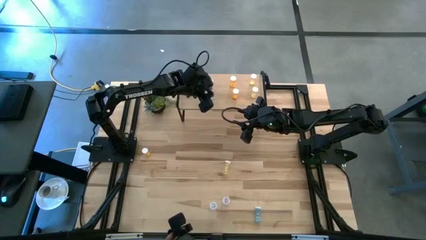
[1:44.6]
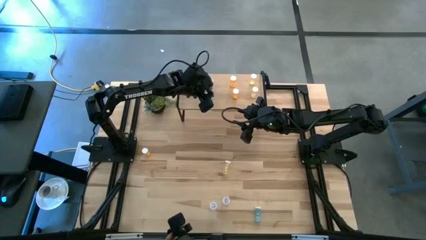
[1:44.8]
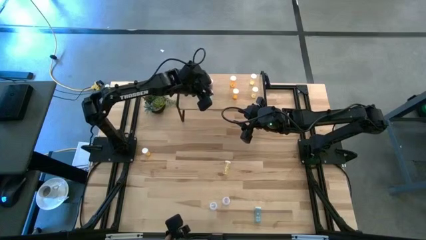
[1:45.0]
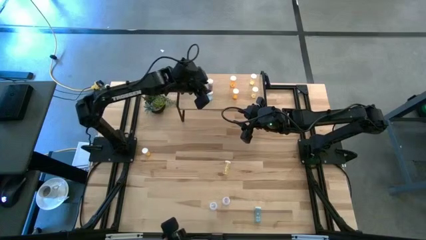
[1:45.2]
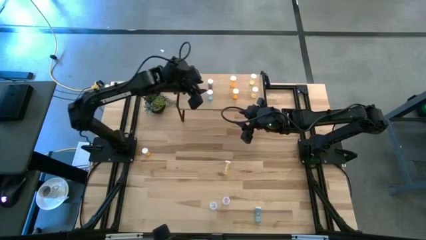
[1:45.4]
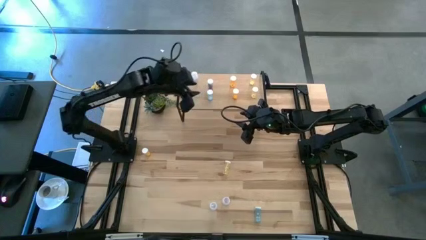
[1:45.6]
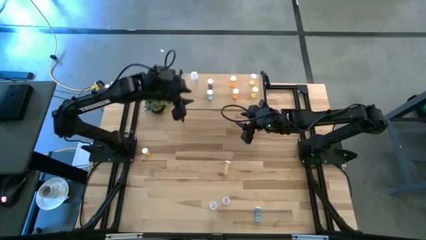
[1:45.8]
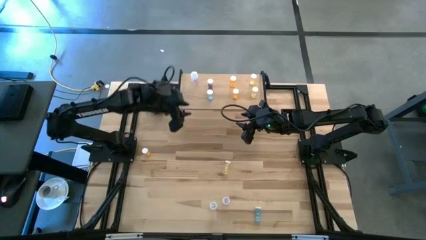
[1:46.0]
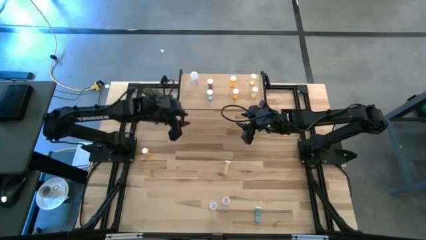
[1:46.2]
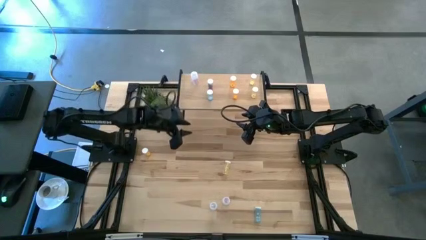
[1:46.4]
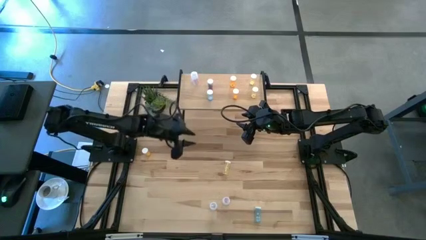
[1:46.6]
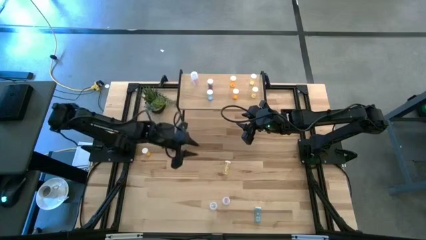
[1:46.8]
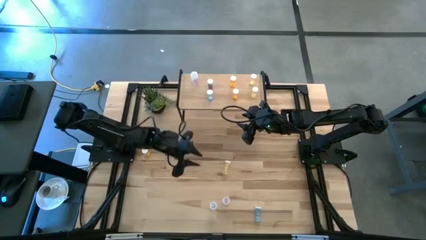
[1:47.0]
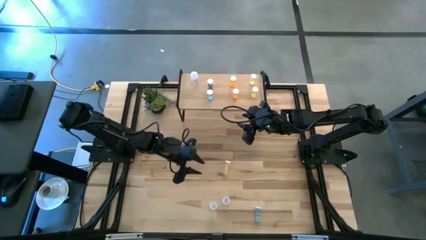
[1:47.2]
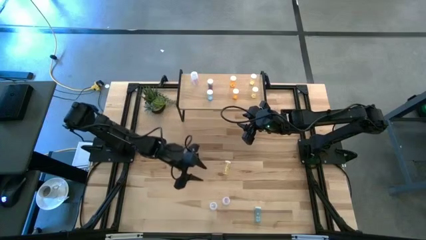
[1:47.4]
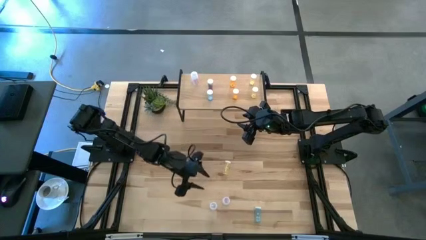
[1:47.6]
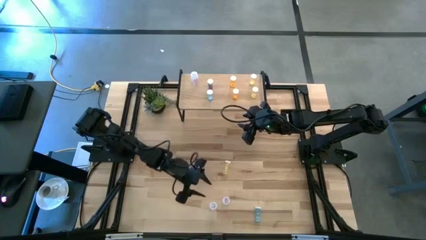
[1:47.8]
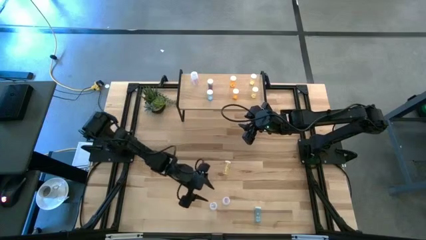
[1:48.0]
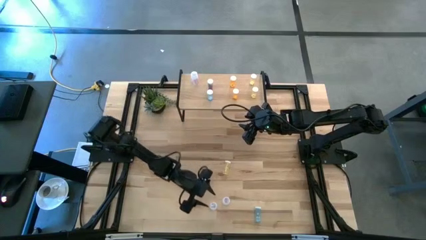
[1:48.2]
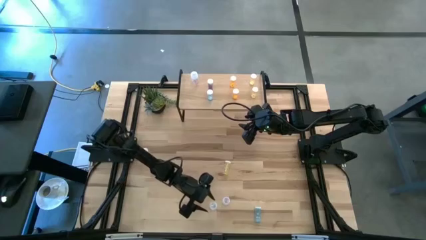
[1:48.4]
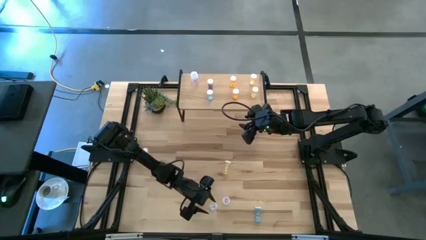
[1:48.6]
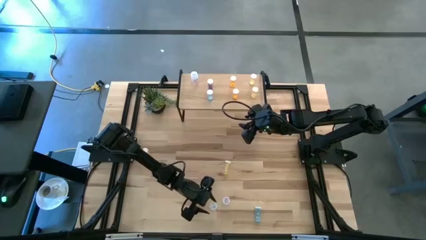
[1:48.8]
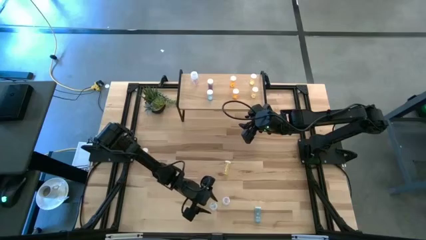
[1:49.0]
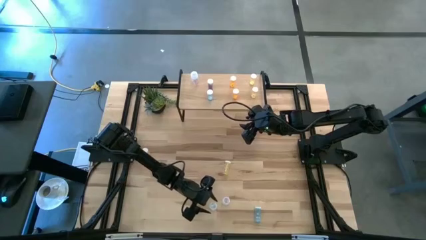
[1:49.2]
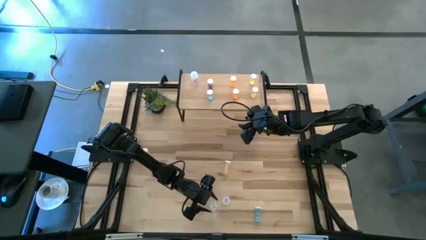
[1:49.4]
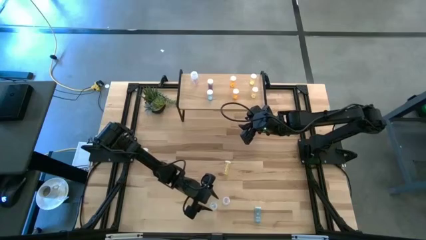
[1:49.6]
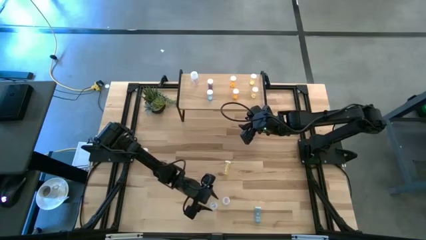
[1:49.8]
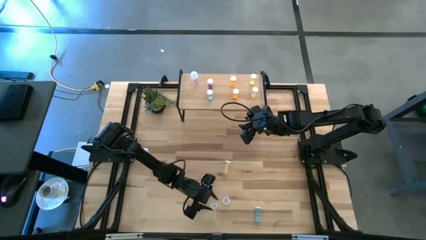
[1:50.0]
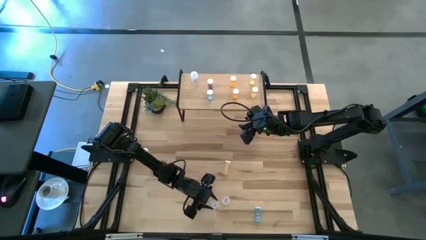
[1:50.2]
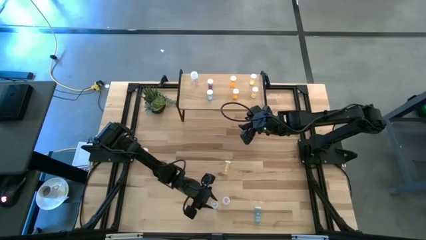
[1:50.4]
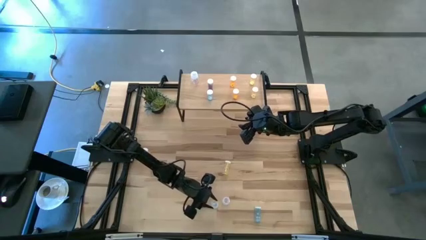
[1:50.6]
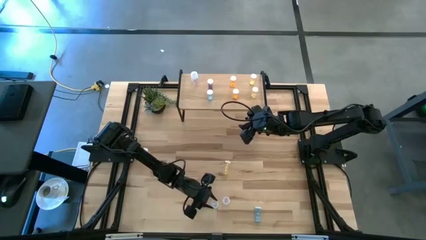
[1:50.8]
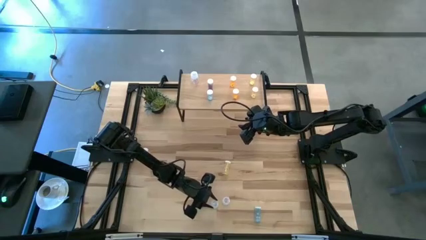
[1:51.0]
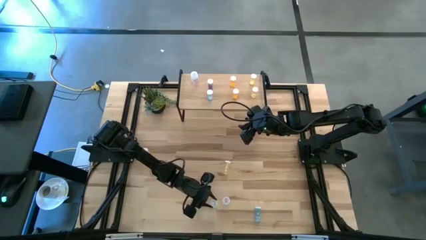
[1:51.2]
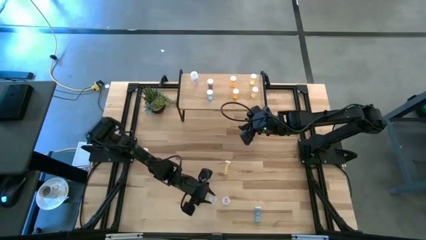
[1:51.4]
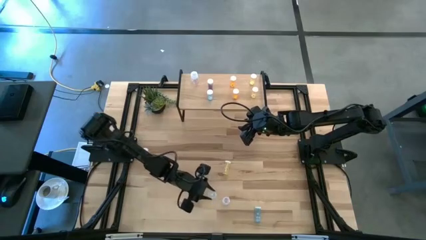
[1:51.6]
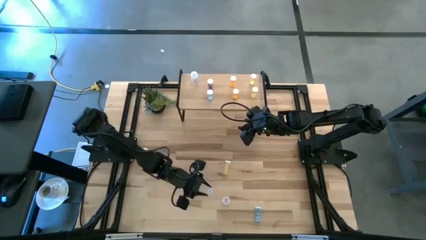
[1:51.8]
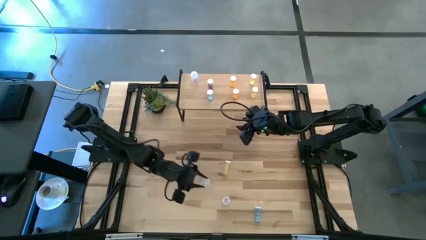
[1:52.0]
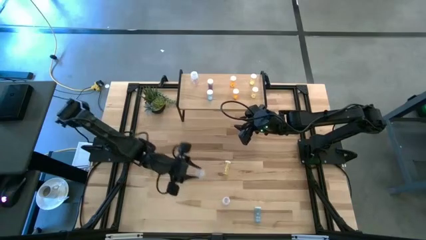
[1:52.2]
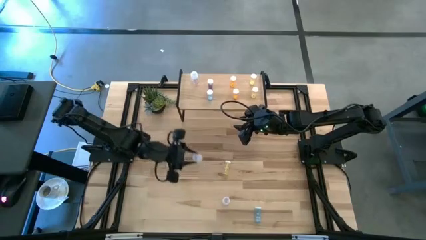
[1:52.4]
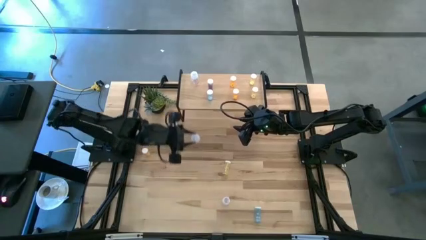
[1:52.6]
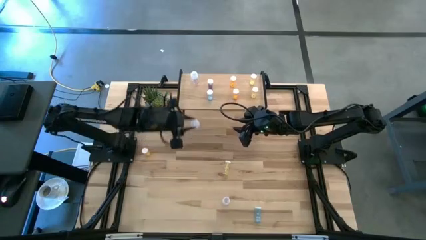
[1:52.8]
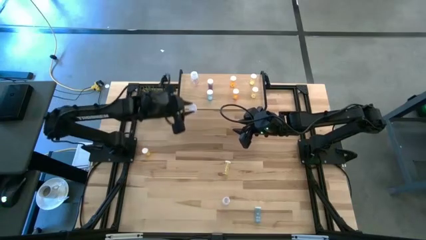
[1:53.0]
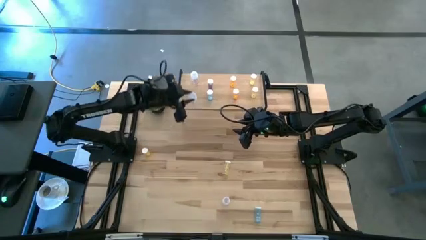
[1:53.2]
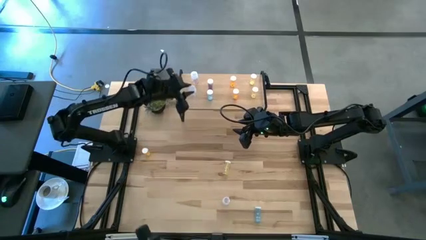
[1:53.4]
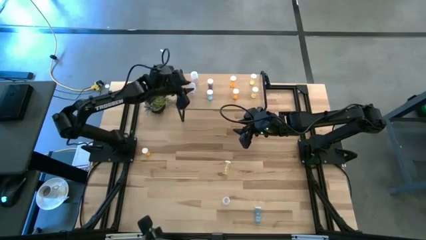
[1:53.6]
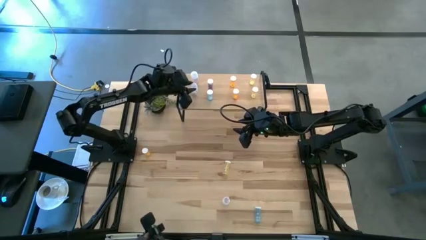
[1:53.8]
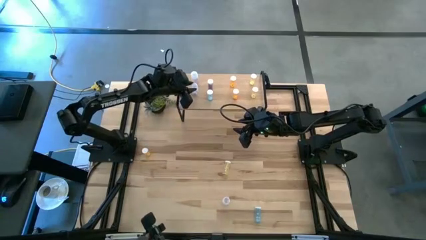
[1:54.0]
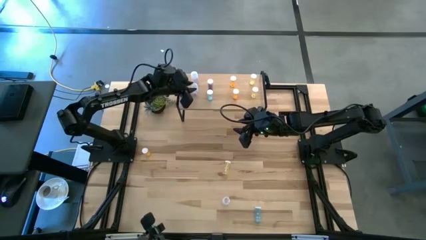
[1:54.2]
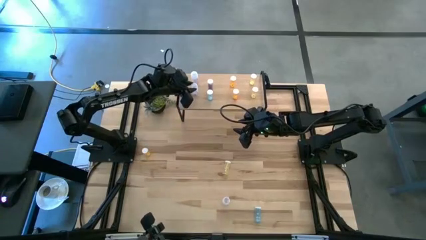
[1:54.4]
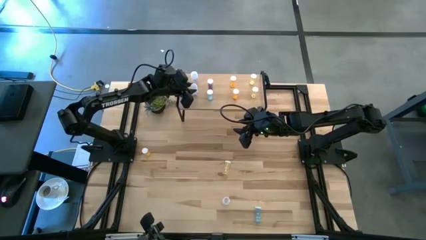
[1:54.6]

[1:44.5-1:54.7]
Task: Pick and place medicine bottles onto shelf by color
Put the left transparent pill bottle on the shelf aligned with the transparent pill bottle

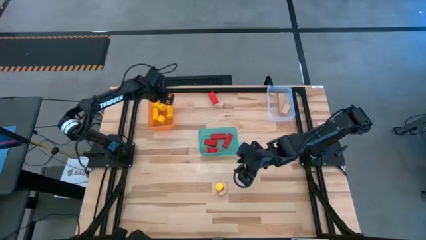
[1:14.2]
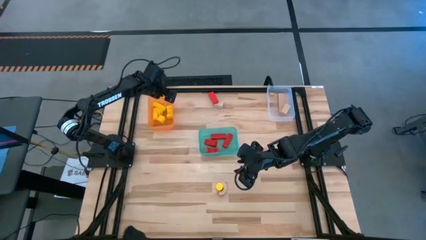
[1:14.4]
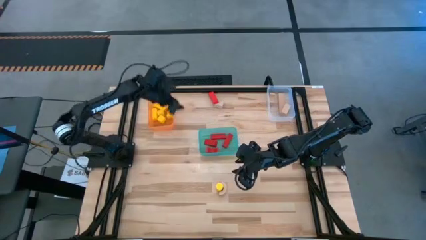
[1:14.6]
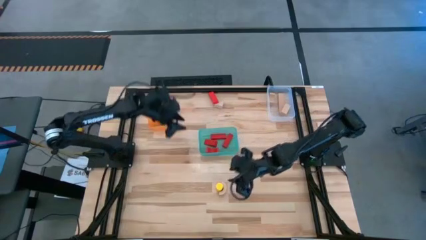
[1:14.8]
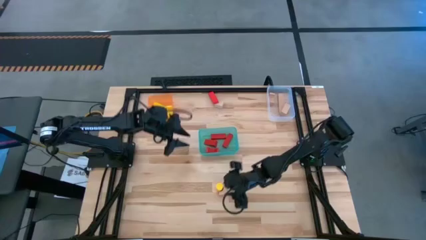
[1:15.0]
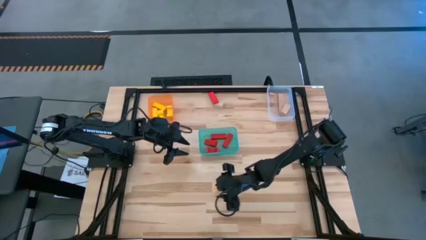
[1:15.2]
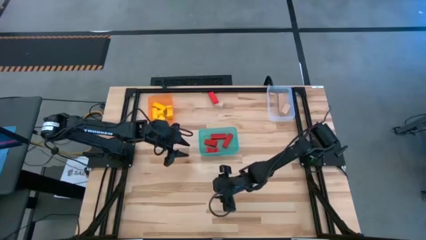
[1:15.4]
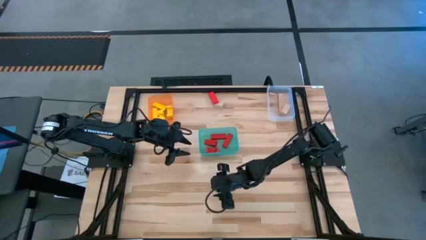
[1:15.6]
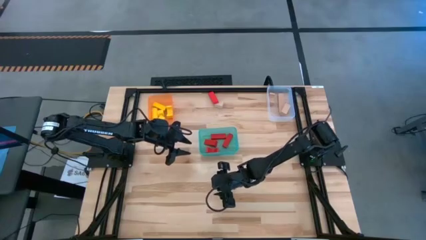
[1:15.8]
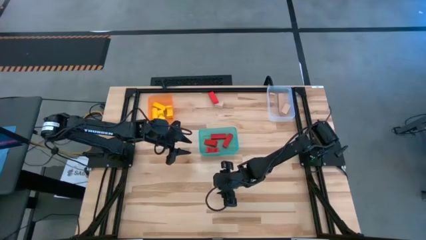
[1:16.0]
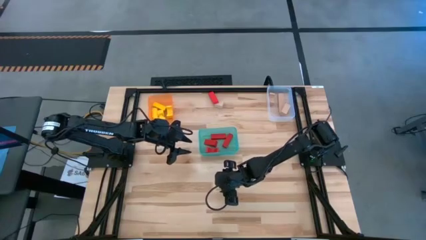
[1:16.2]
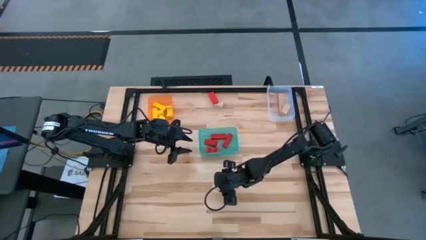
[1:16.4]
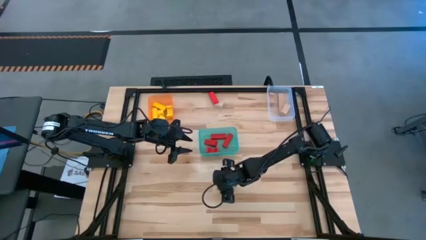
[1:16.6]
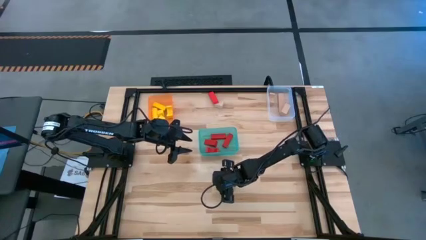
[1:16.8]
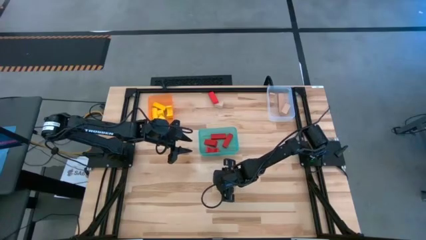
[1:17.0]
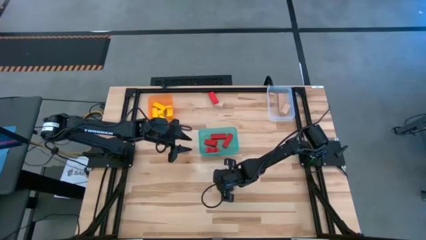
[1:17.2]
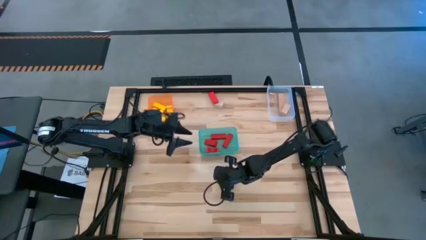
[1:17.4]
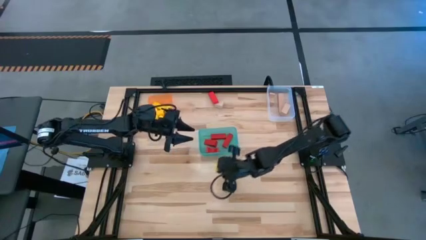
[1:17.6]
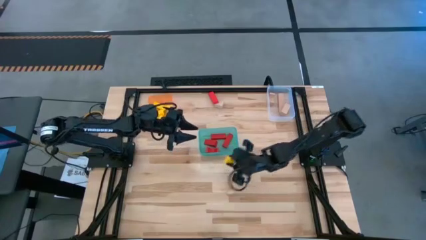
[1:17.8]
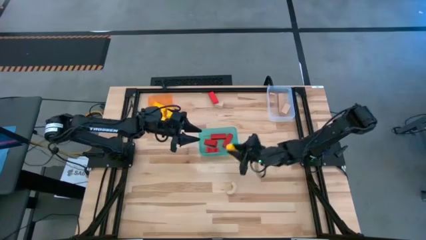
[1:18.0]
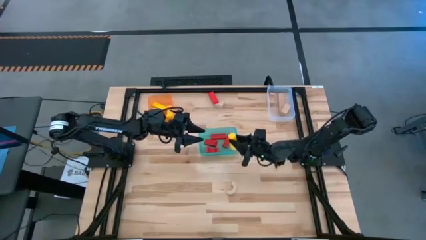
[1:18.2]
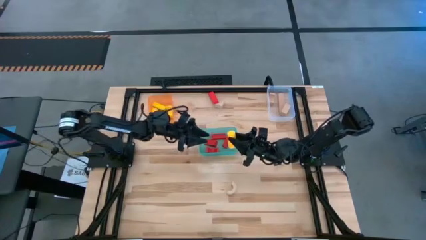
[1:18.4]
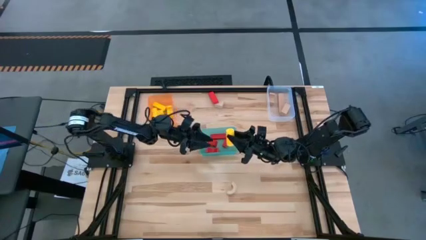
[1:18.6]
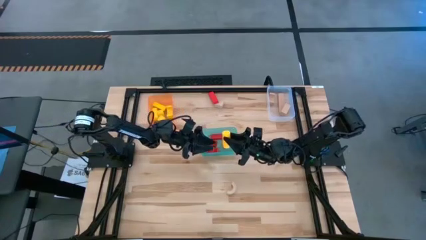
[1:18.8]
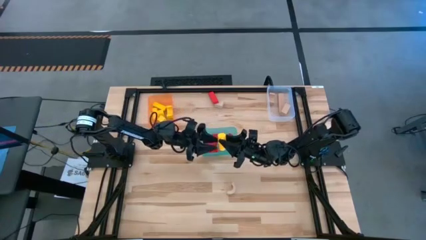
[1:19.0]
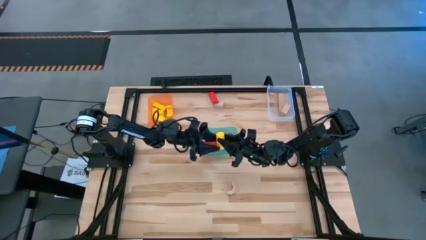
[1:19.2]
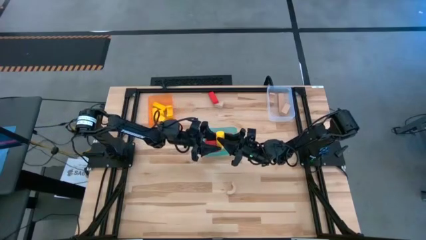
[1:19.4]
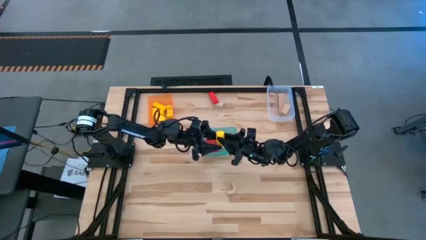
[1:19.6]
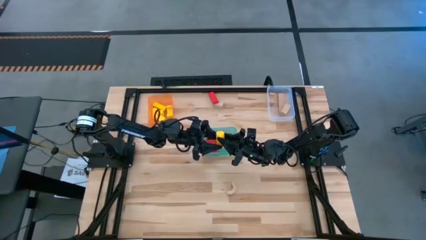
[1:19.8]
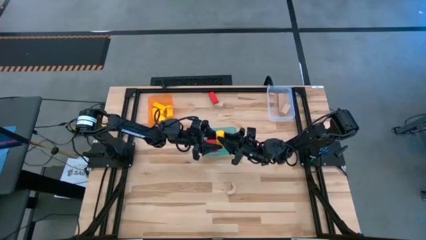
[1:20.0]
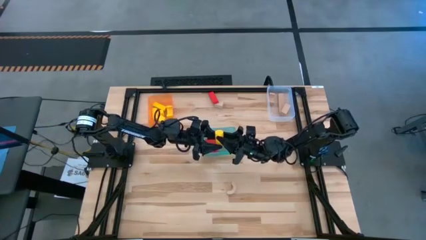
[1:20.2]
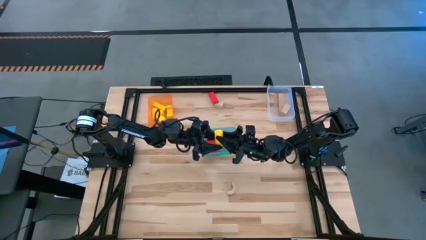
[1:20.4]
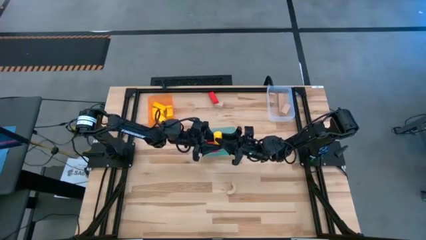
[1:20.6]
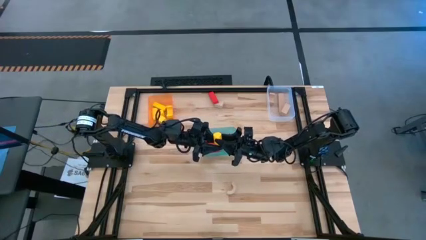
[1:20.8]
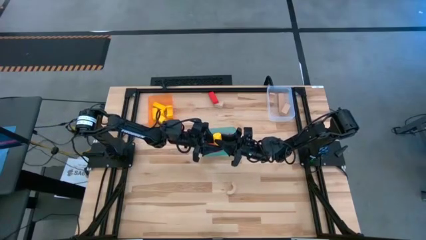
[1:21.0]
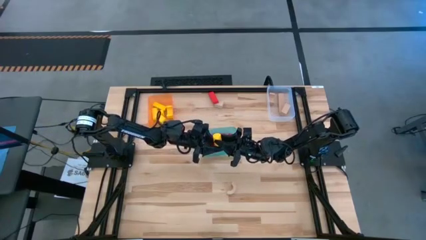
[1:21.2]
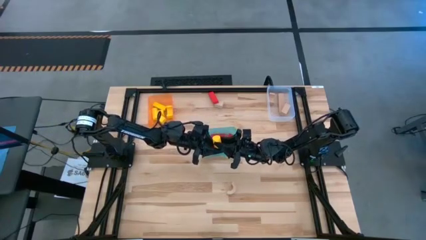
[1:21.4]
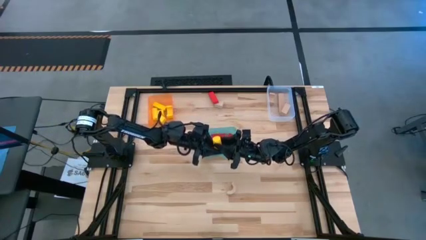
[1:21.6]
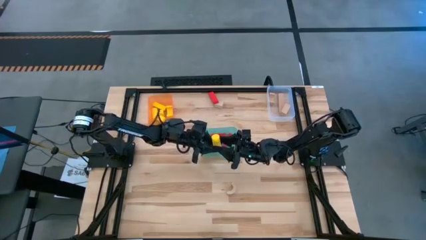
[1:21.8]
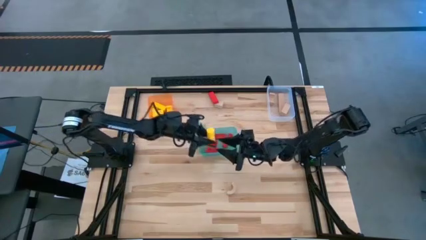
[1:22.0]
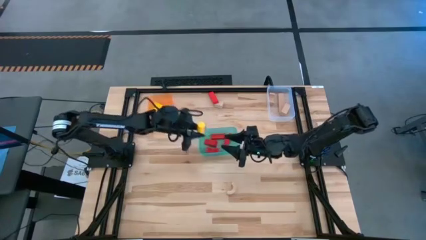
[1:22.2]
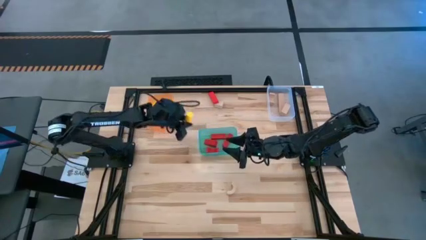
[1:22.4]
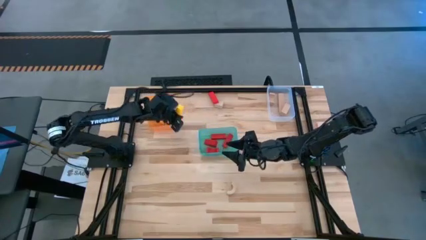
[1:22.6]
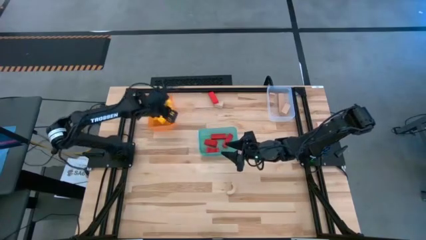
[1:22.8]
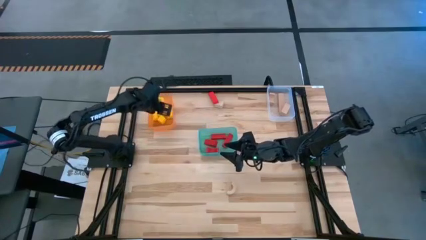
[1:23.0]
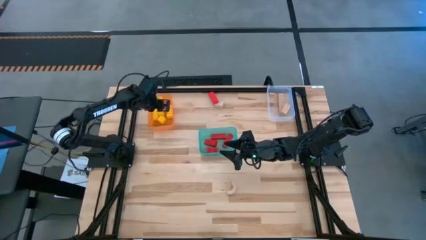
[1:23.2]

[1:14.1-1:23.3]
Task: Sort & place blocks by color
Put the yellow block into the orange bin
